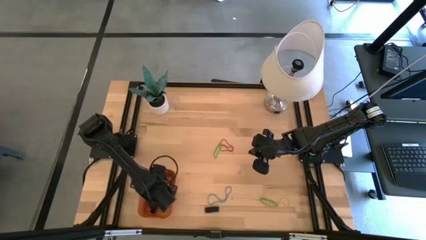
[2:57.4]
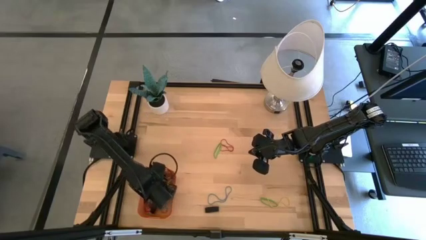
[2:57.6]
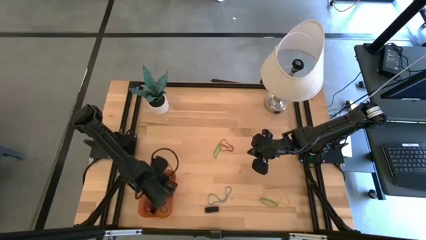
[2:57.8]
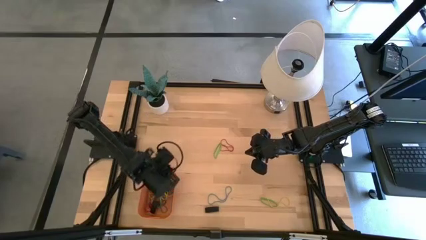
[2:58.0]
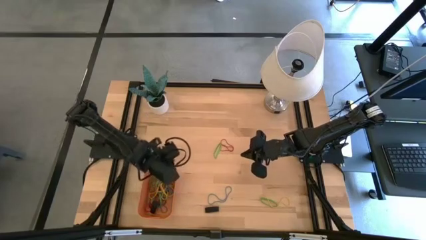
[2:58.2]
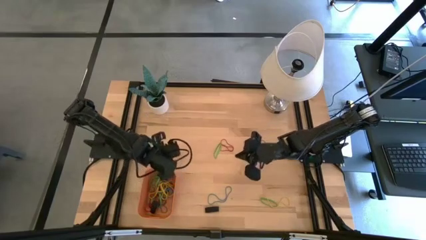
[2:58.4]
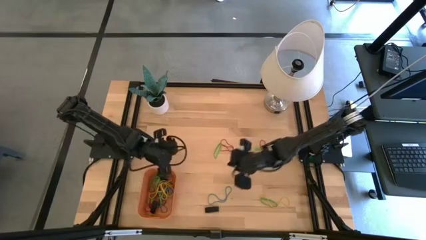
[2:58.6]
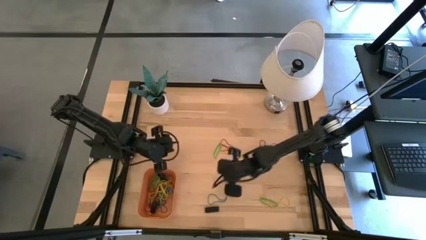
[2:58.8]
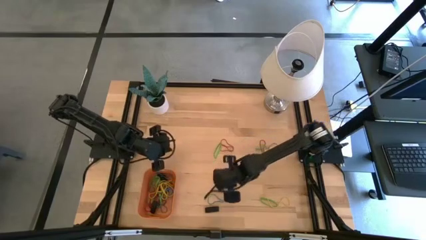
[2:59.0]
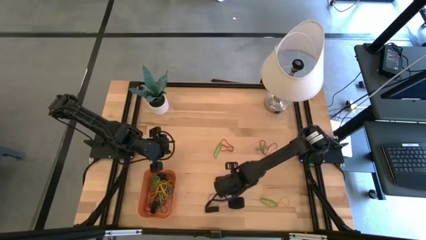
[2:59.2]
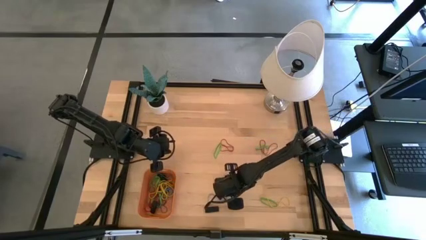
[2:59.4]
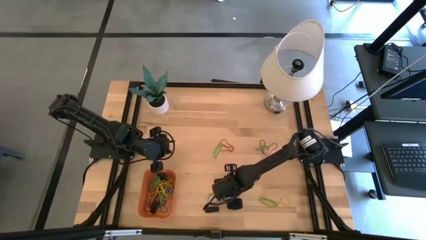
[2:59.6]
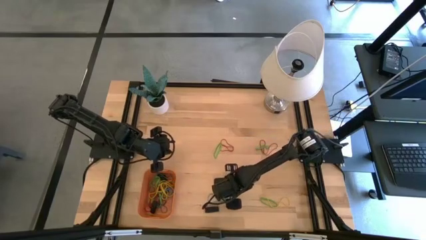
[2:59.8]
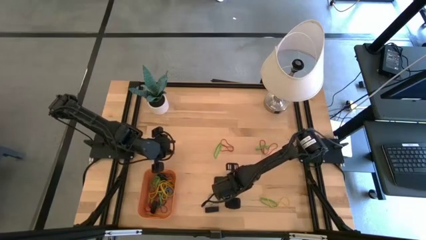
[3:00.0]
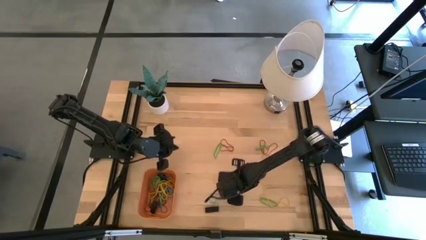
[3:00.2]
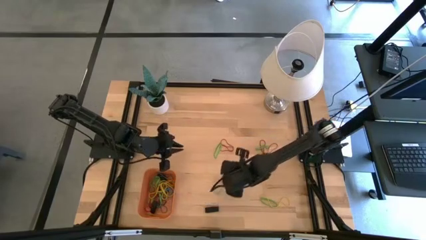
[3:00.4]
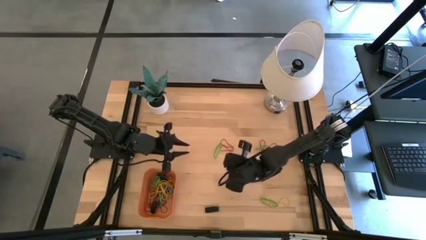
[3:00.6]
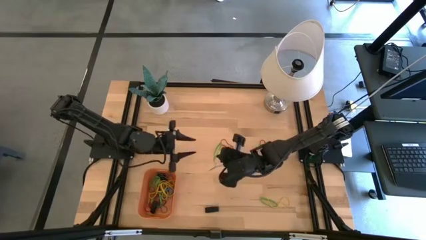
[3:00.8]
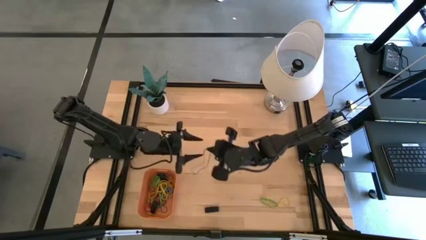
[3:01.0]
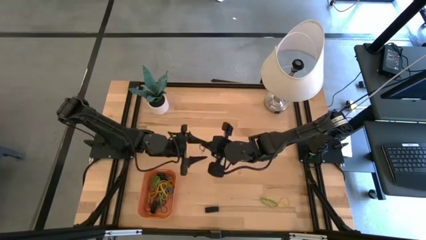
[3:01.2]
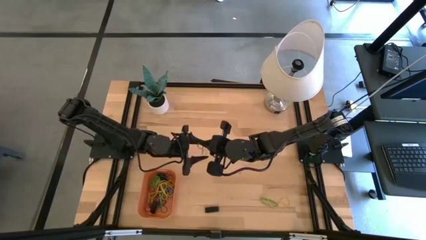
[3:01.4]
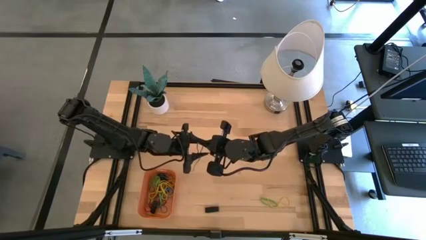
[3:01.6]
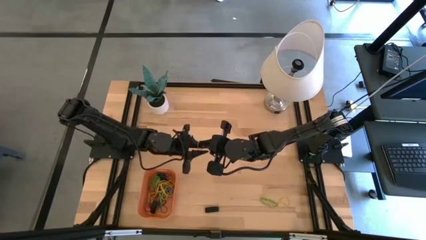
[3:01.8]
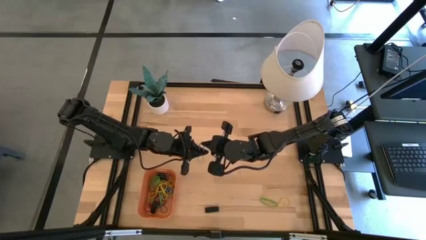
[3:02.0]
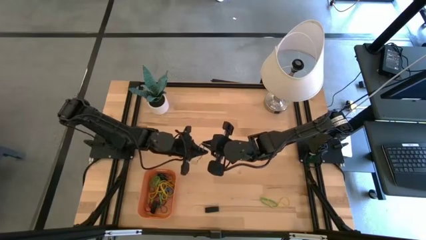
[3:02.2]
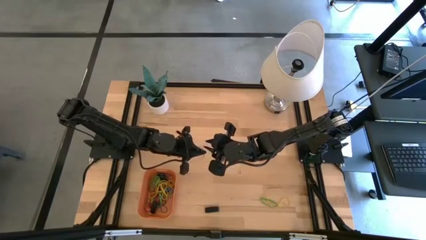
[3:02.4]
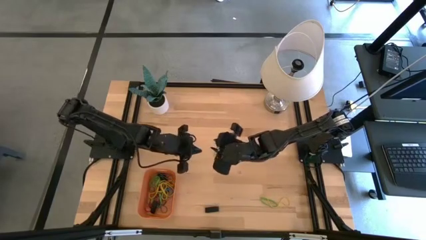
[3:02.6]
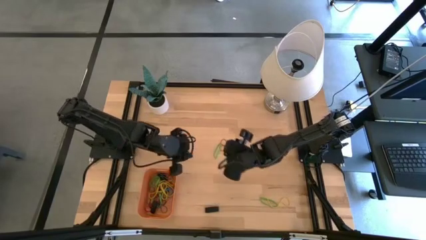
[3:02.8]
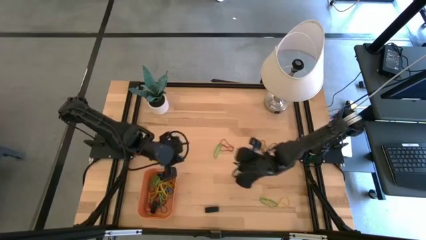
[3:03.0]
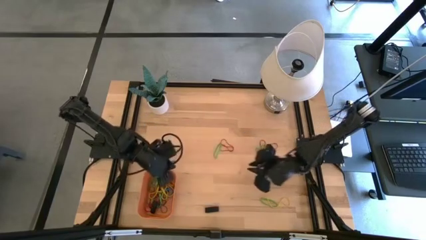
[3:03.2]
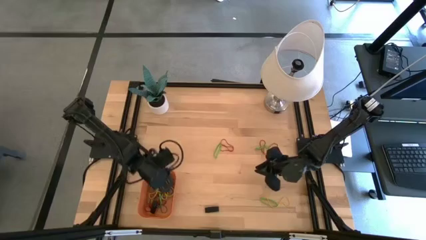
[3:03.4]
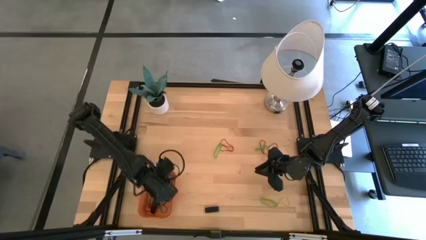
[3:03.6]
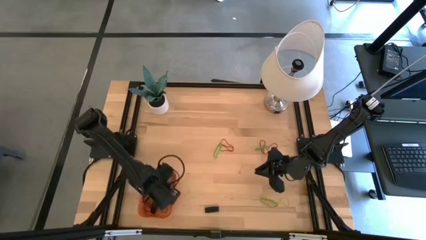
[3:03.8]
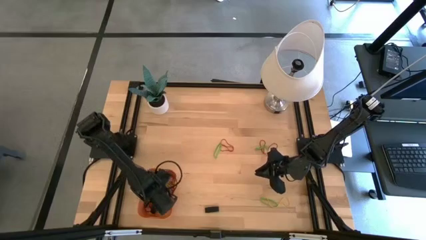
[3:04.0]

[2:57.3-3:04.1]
Task: Pick and place rubber bands into bin
Put the blue rubber band into the orange bin

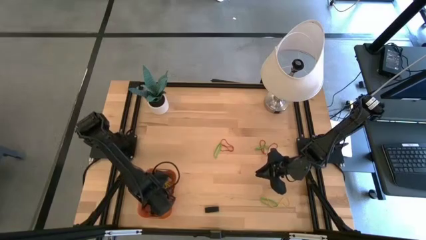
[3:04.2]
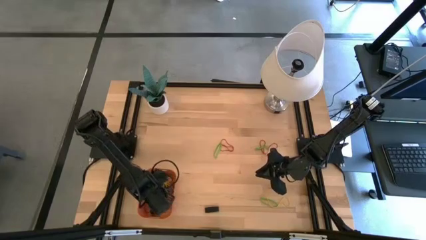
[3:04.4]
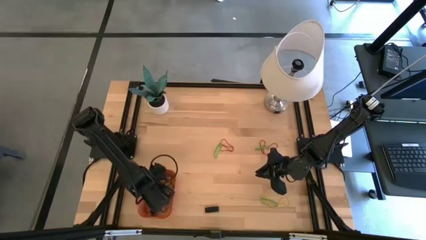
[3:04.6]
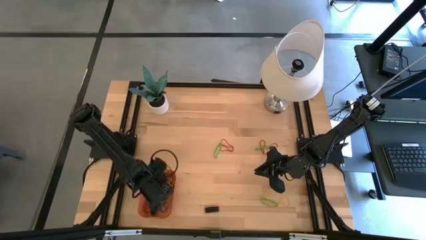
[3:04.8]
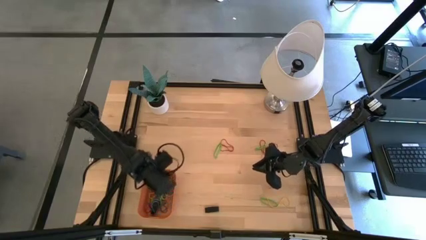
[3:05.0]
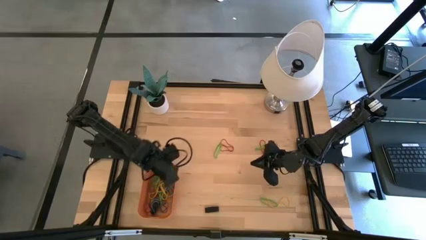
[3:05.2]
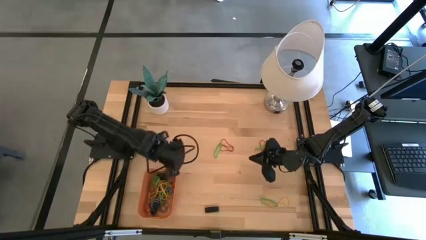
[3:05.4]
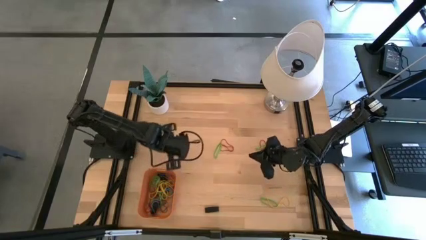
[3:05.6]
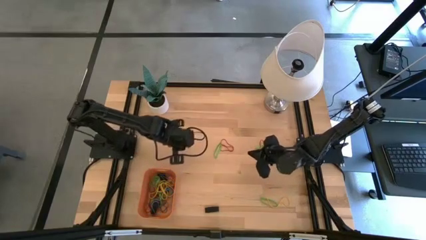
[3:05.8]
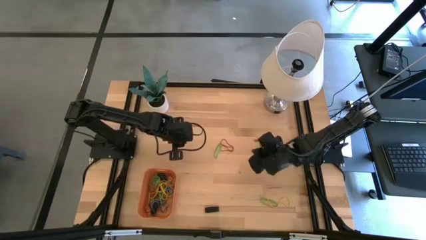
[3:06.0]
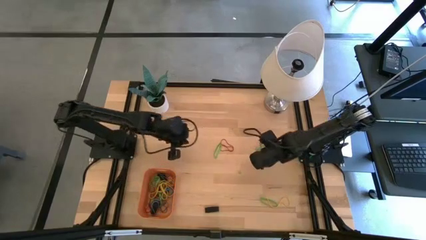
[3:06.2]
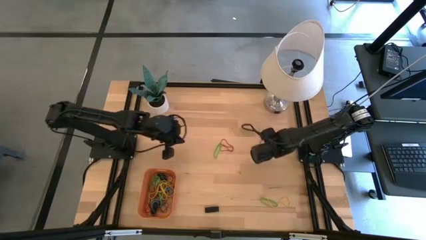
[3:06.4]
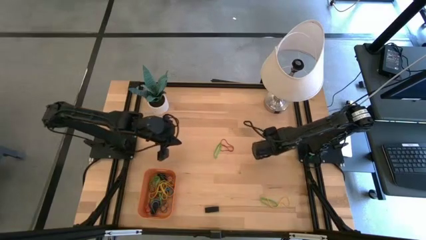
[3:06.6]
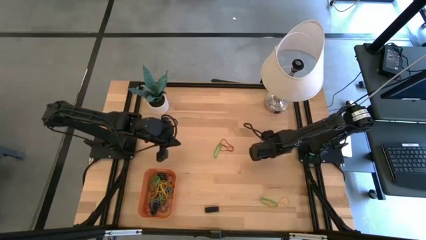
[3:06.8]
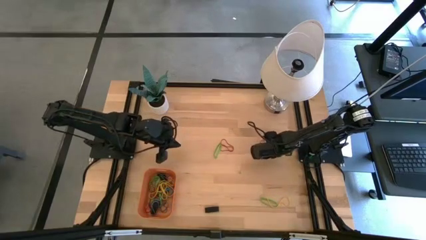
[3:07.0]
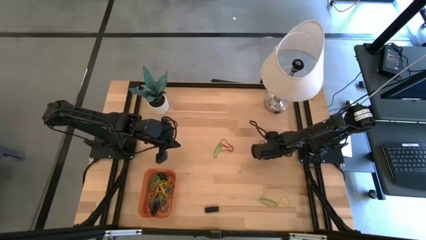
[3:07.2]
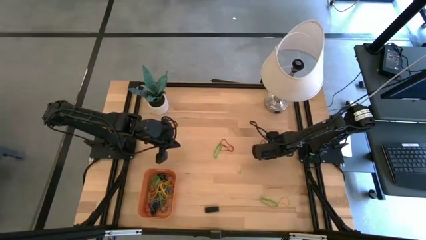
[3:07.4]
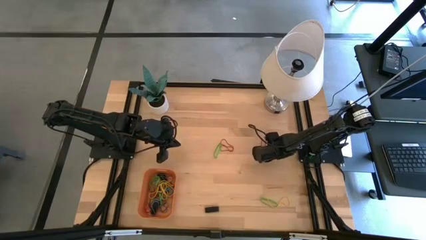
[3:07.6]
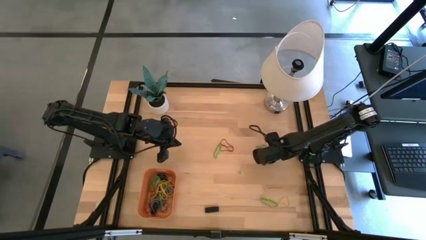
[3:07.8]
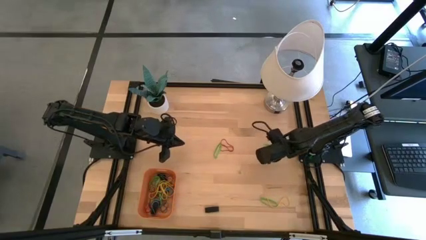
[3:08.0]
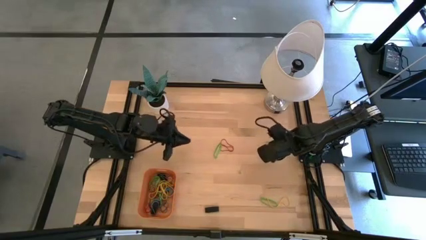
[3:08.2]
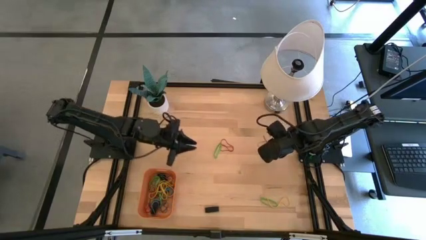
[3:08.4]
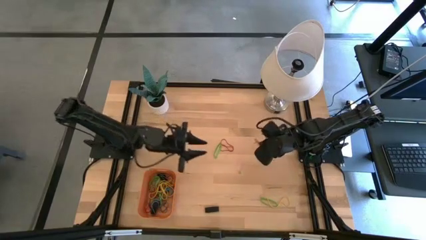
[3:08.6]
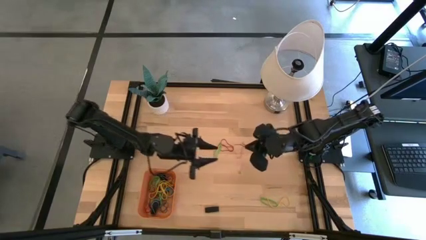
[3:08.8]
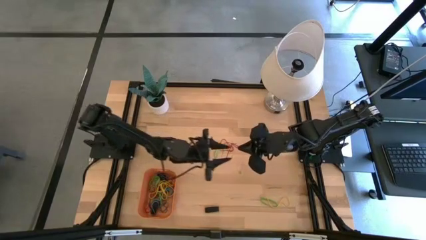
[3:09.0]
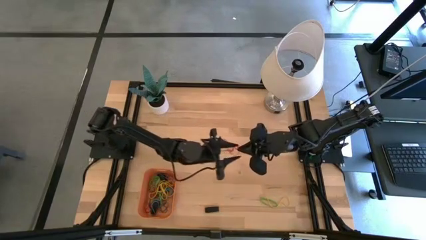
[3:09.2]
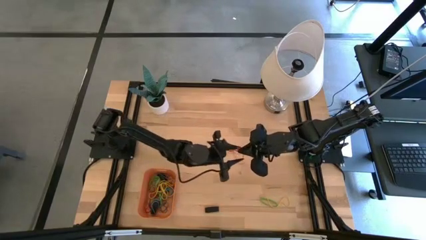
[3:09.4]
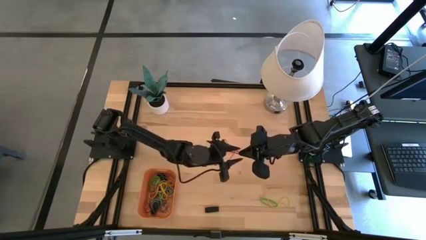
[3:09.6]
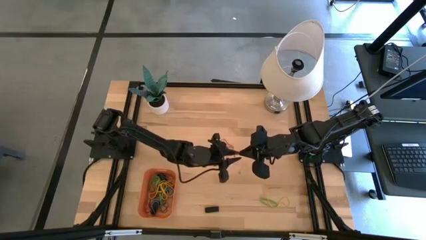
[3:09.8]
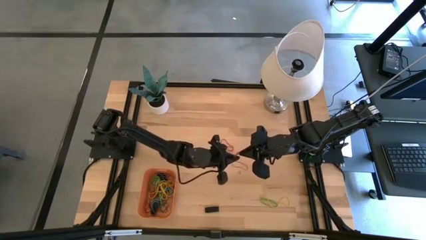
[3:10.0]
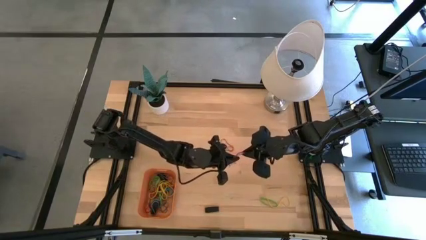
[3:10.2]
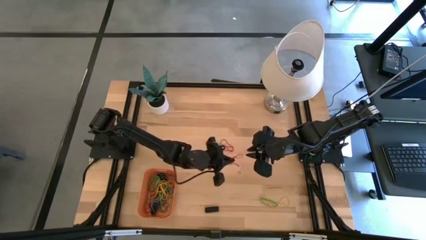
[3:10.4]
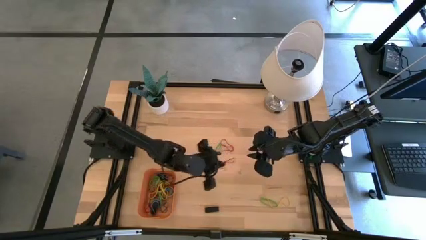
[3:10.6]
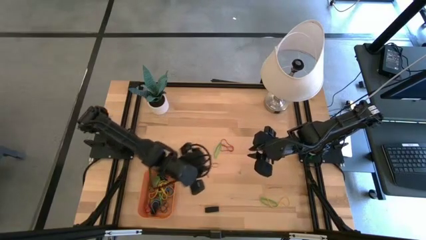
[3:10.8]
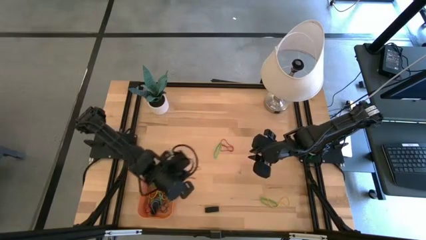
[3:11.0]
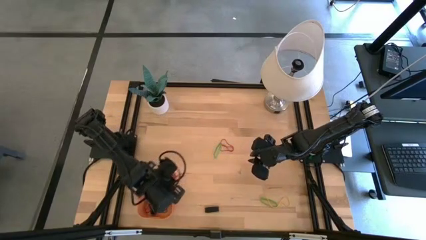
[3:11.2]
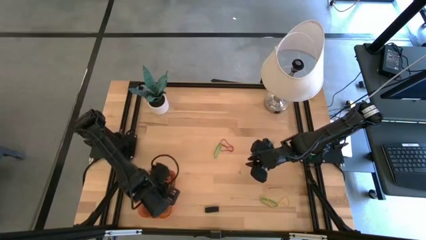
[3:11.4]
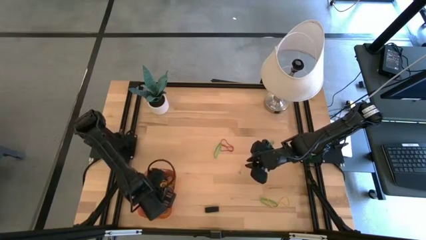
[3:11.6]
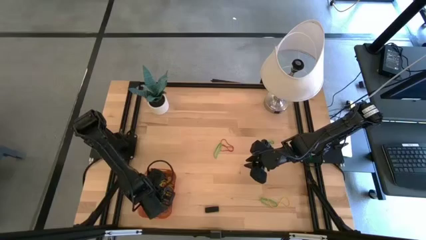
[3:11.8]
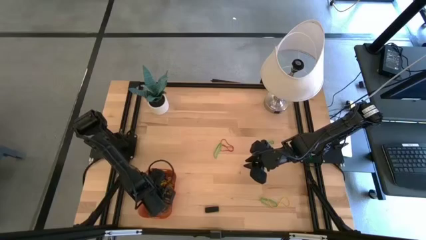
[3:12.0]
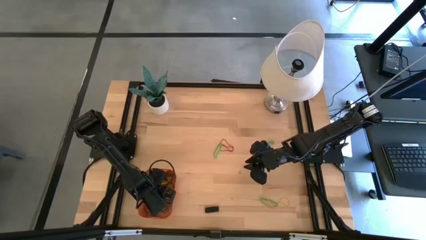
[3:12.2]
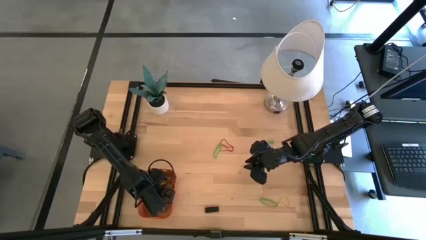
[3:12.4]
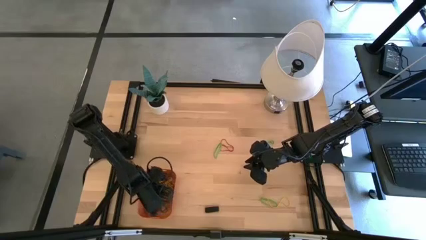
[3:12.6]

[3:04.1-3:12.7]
Put the red rubber band into the orange bin
